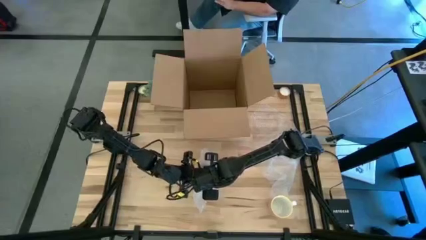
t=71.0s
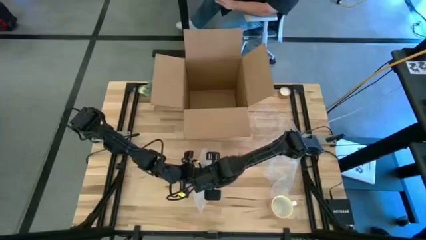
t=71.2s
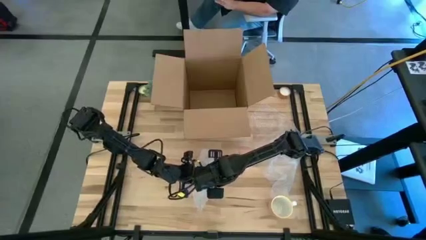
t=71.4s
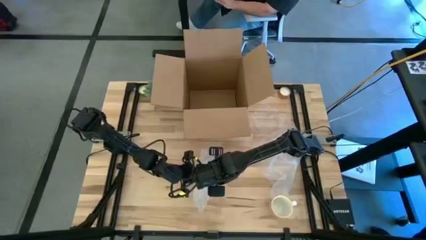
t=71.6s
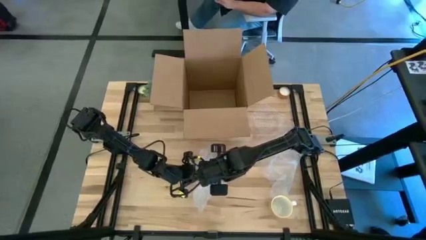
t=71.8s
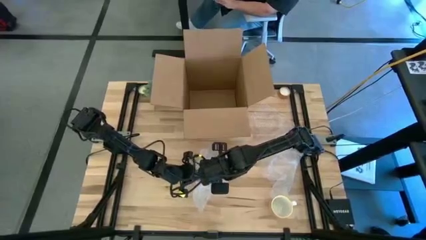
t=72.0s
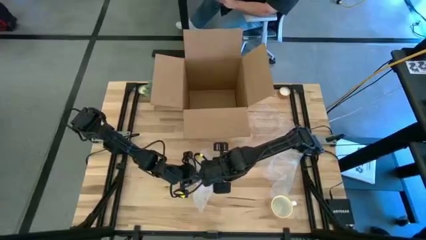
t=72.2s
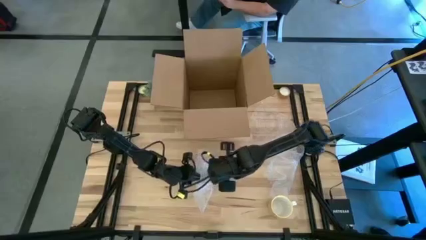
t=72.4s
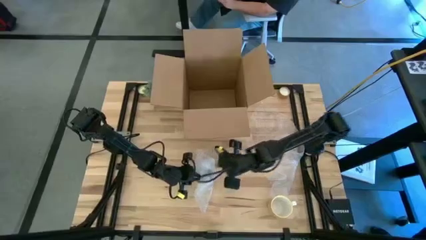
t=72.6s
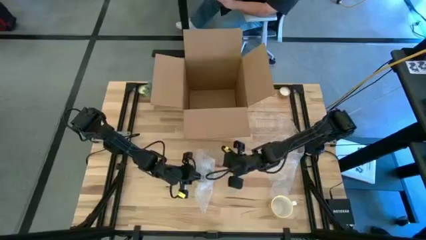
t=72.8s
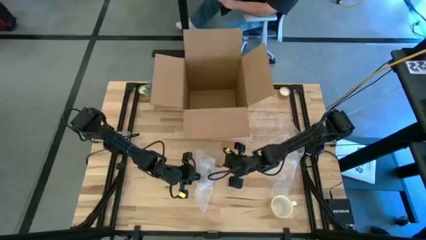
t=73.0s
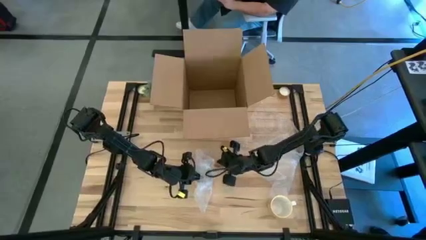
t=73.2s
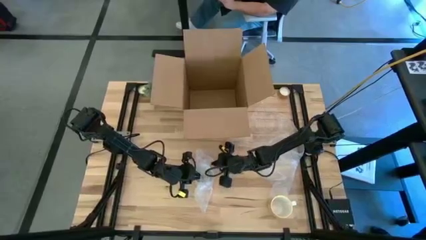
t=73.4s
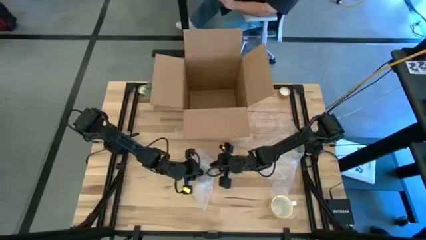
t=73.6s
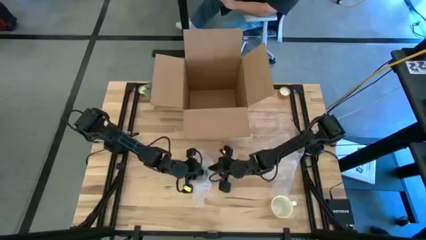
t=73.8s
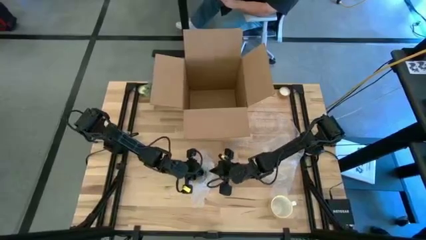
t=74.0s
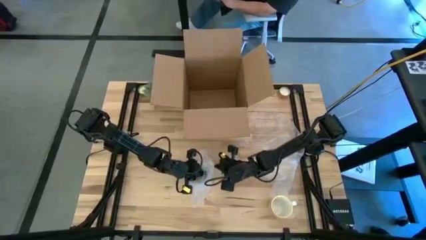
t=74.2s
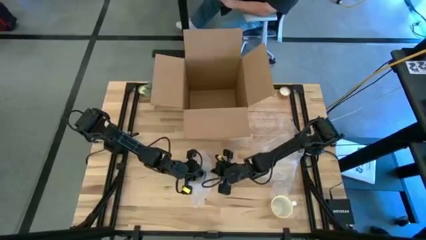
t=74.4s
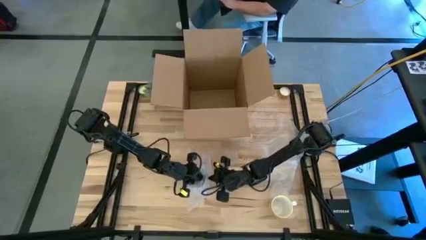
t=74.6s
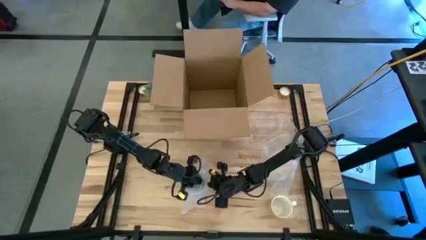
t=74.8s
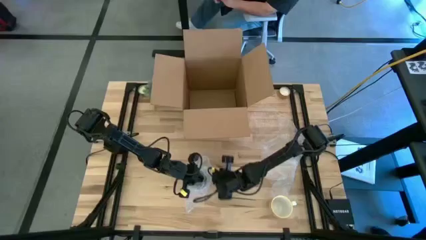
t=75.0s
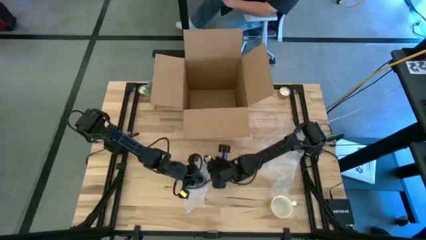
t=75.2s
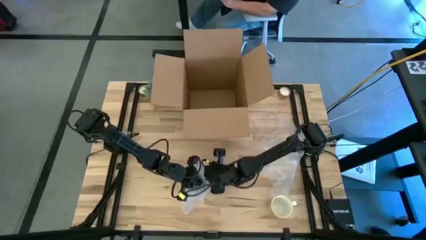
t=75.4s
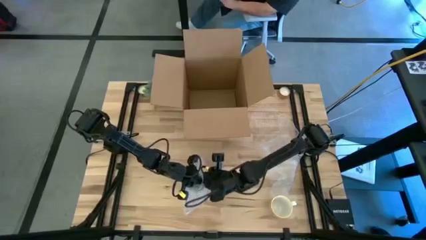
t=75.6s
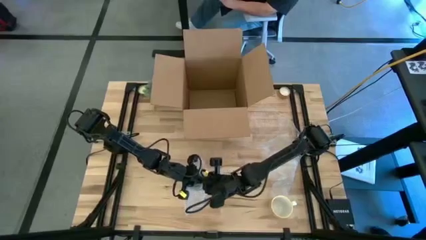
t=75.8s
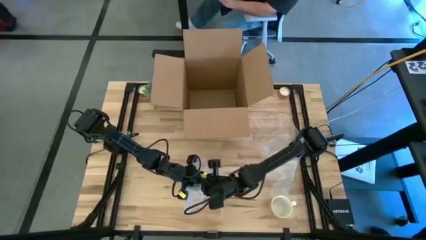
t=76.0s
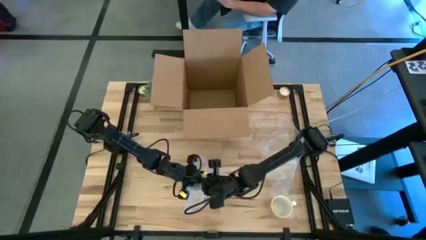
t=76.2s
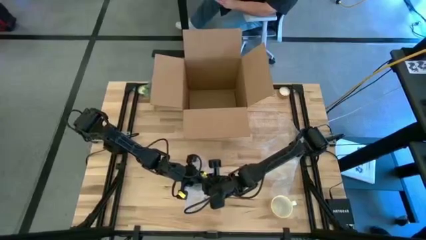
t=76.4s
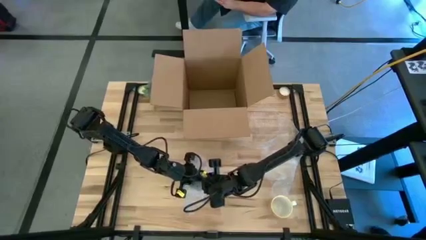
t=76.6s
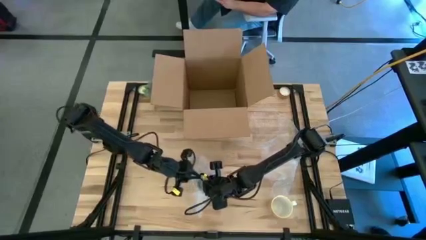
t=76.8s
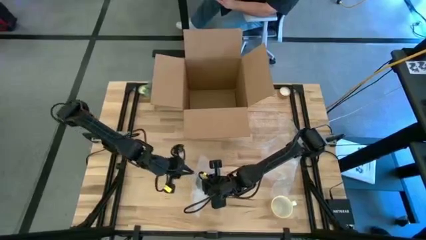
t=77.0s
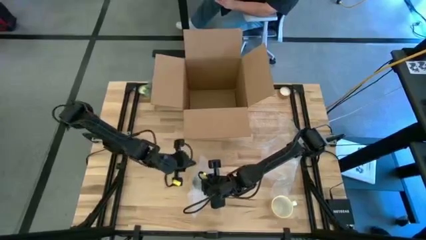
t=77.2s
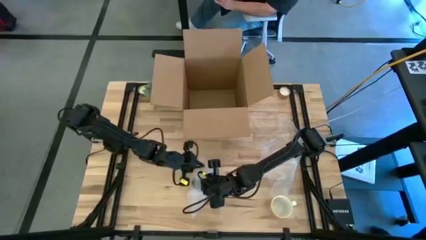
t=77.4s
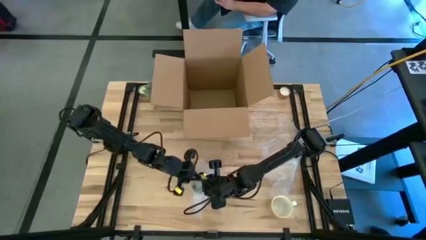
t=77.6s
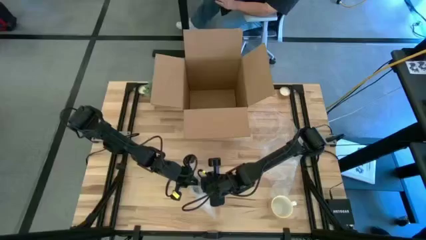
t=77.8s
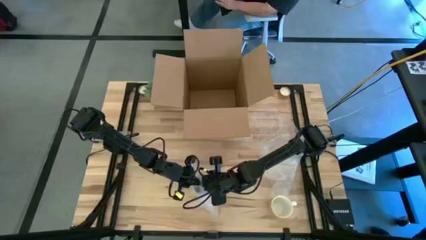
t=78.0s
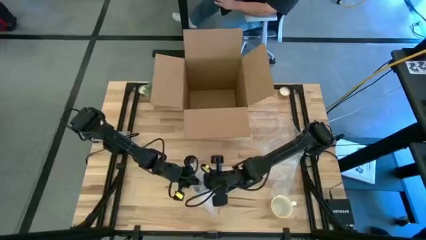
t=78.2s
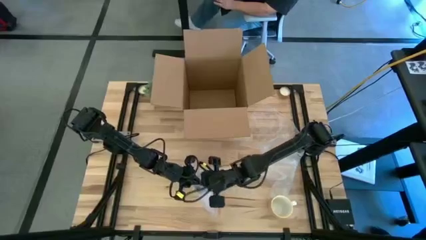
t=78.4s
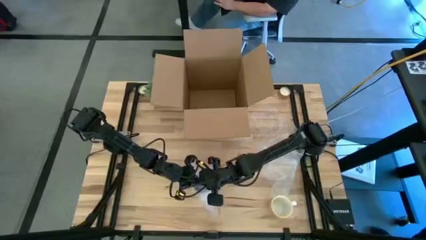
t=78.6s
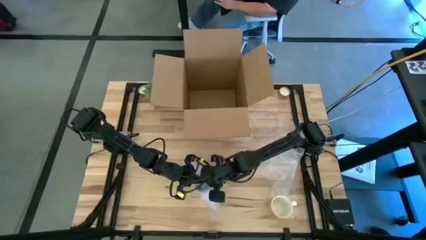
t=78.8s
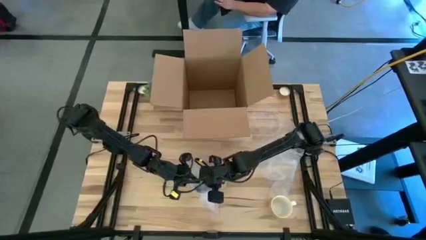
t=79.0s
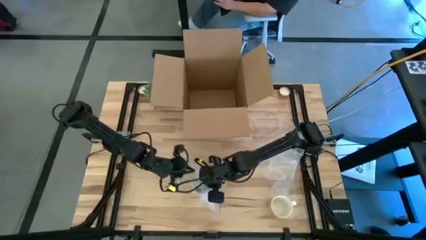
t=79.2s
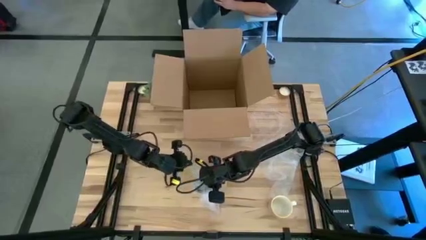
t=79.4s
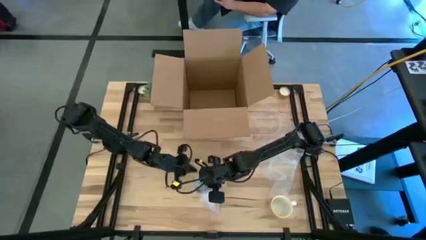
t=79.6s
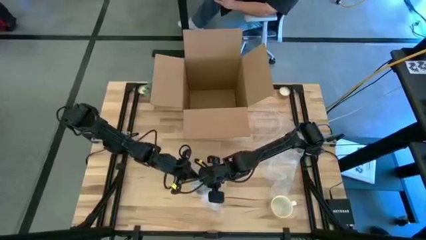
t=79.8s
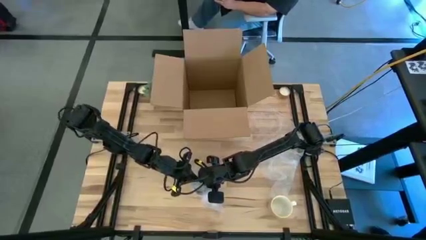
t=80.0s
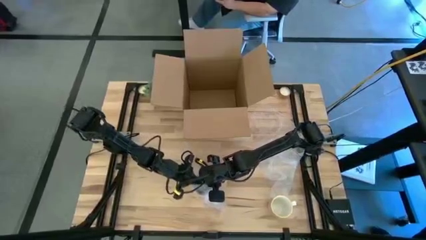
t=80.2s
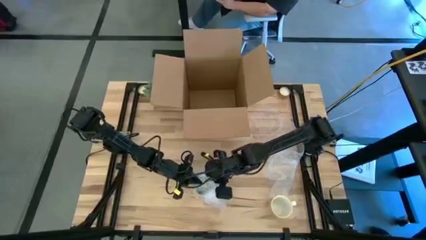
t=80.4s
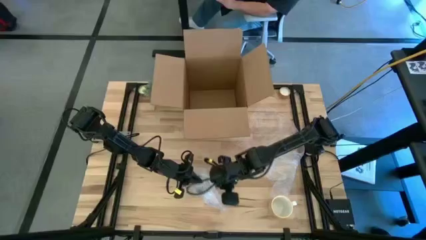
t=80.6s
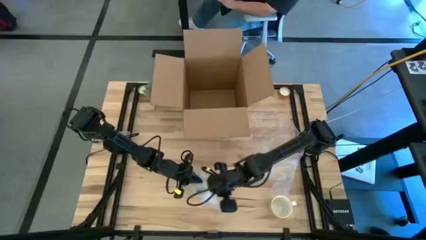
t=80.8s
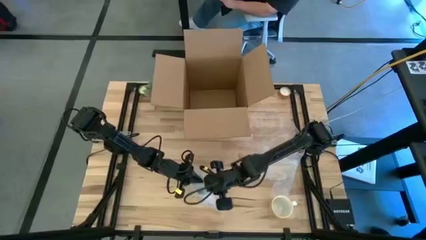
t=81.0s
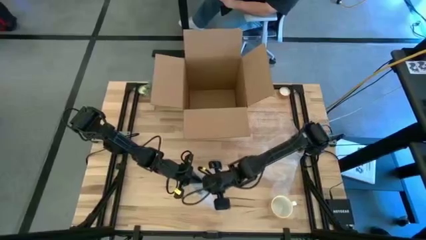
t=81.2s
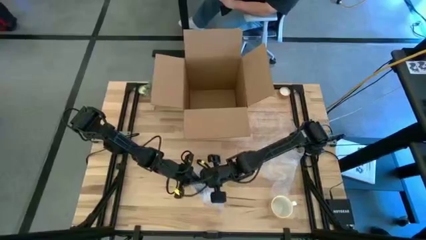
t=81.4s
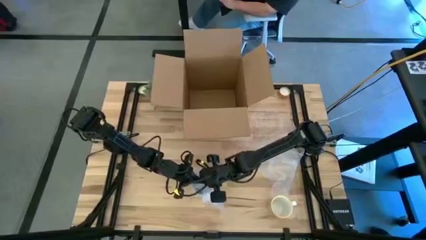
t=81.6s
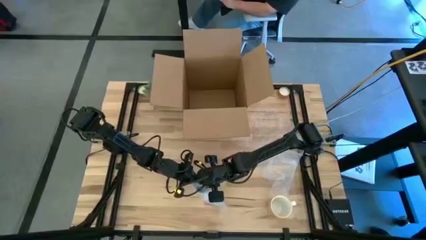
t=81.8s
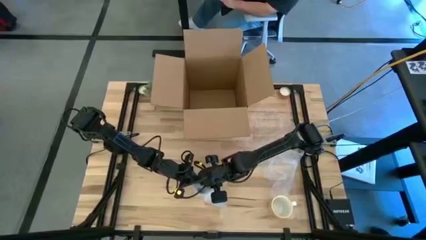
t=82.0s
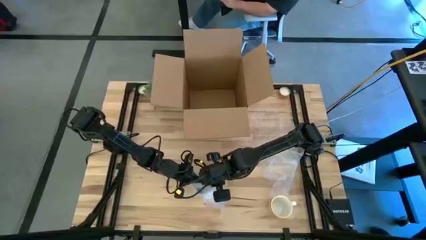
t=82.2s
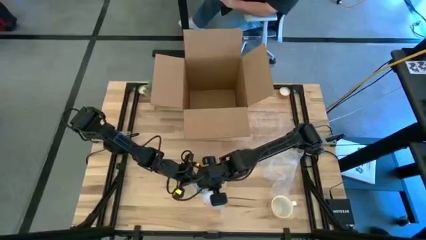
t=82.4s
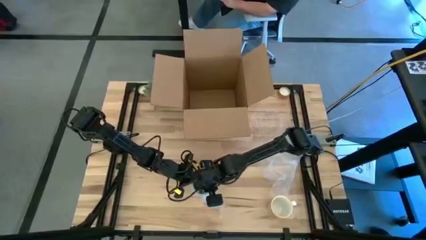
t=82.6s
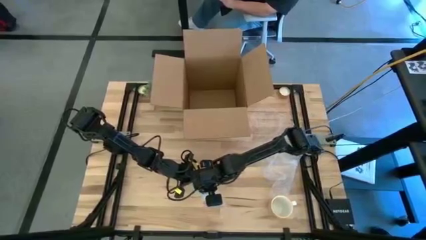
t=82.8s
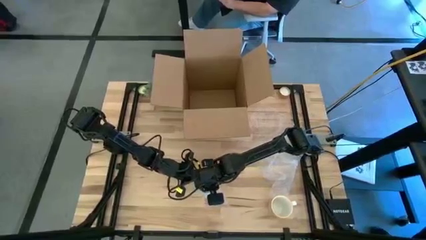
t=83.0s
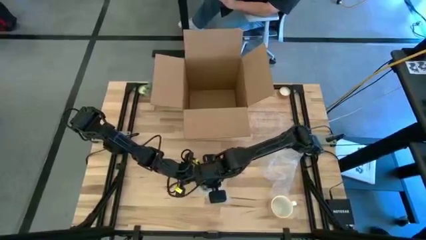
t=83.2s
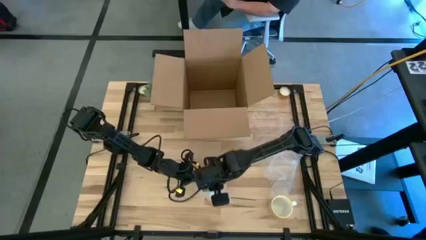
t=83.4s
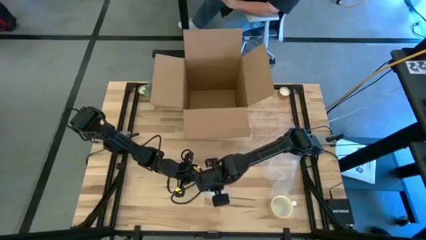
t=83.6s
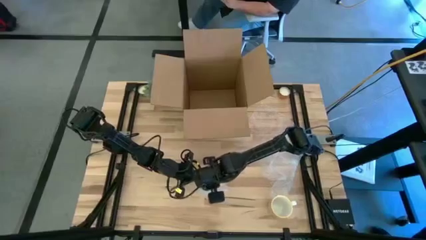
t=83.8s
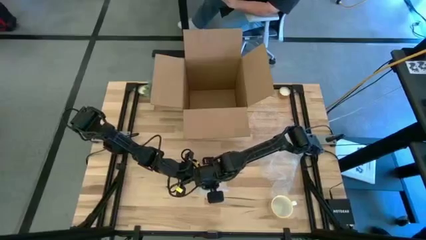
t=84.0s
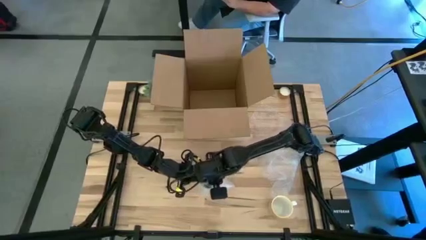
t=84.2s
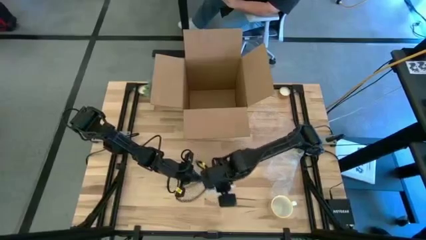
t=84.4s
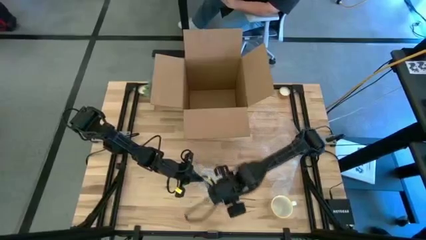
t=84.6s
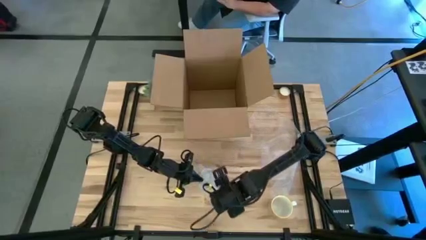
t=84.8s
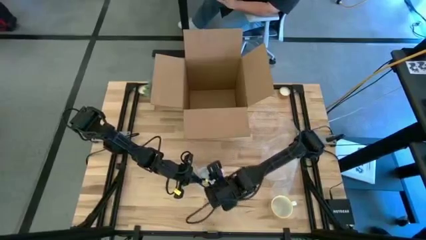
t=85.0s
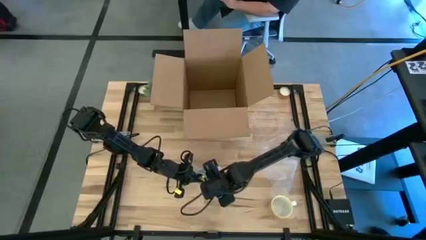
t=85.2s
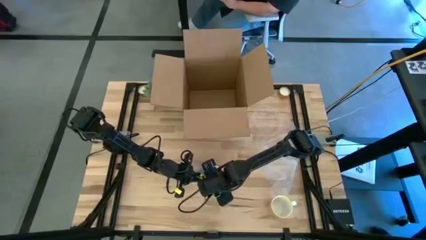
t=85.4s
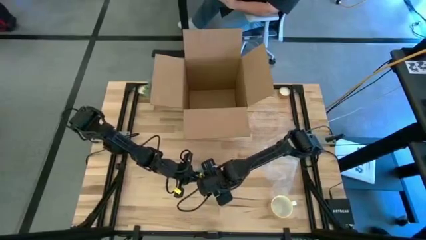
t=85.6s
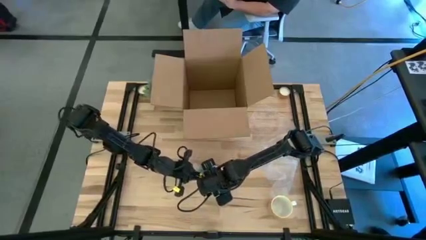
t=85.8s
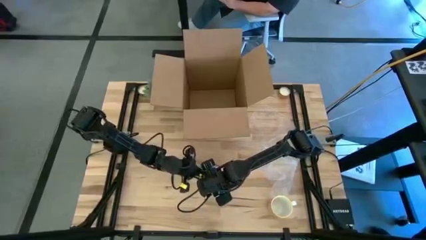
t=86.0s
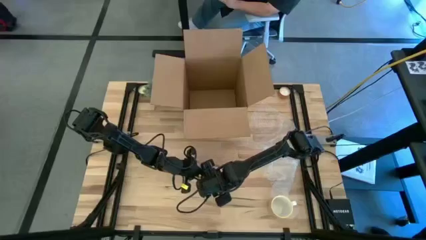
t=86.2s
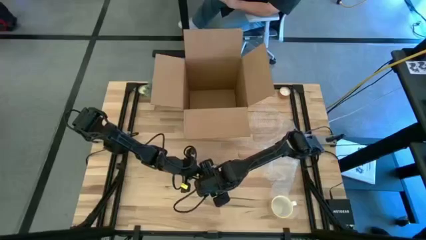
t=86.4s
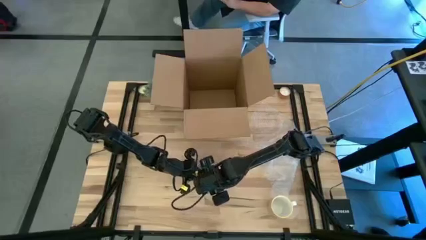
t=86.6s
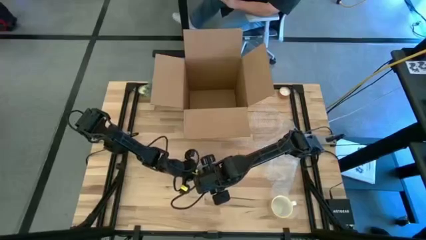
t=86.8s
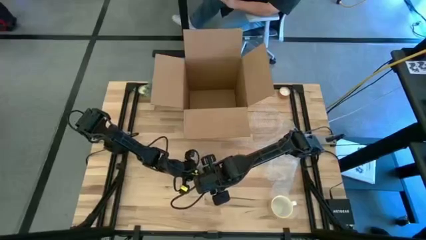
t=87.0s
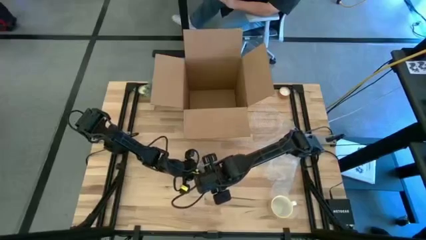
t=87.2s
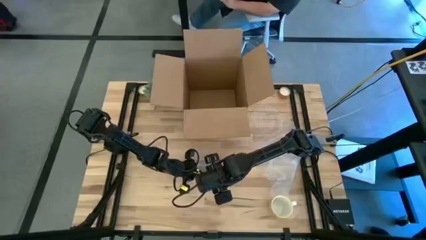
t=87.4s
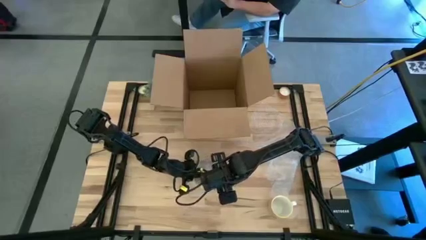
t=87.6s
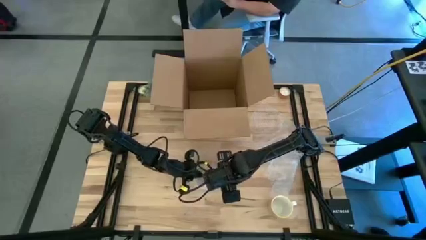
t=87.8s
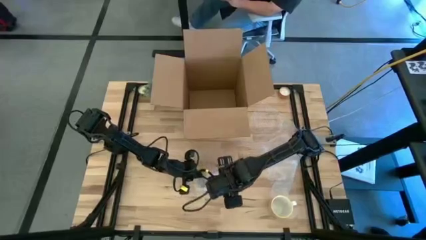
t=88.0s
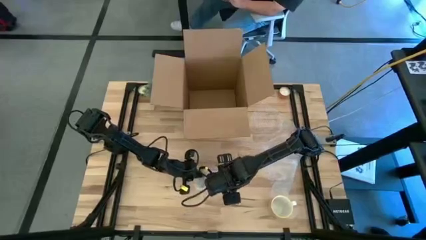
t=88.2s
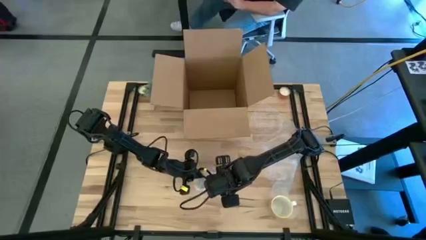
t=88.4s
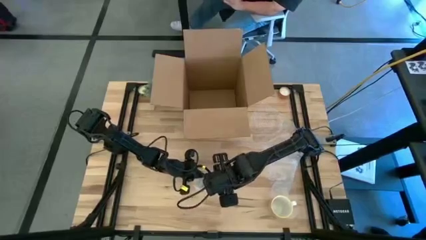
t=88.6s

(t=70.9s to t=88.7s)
Task: wrap mug
Wrap the red mug with the bubble wrap
